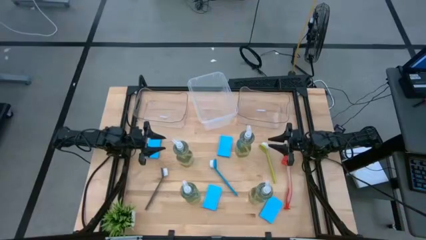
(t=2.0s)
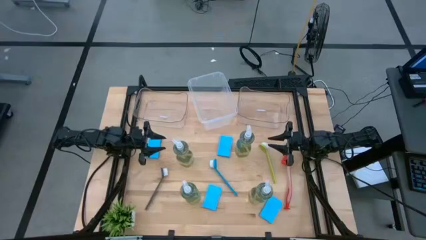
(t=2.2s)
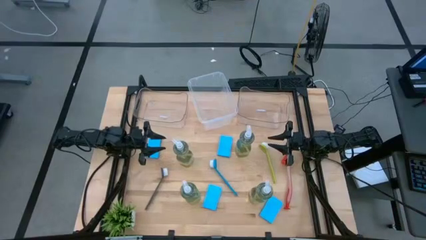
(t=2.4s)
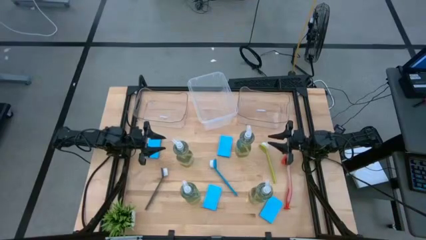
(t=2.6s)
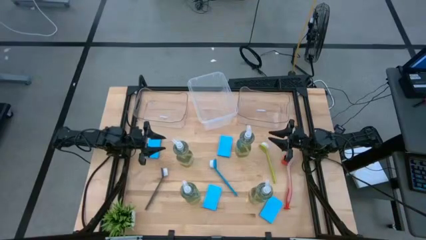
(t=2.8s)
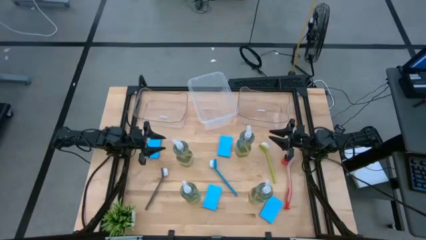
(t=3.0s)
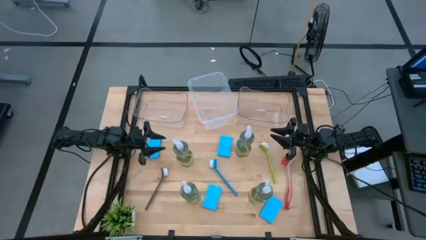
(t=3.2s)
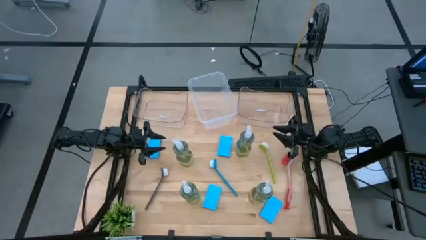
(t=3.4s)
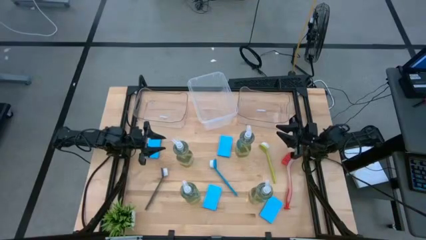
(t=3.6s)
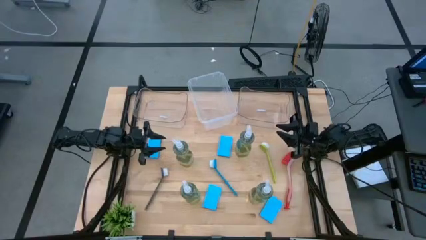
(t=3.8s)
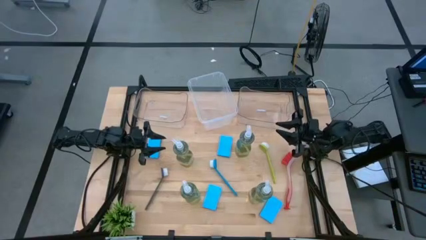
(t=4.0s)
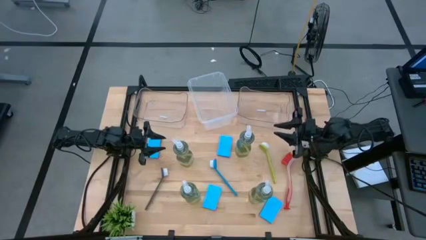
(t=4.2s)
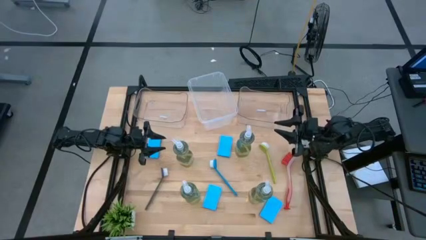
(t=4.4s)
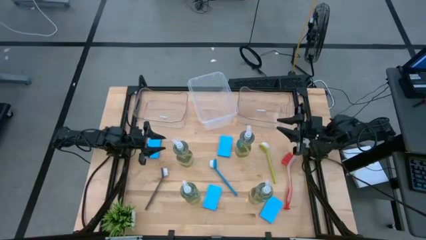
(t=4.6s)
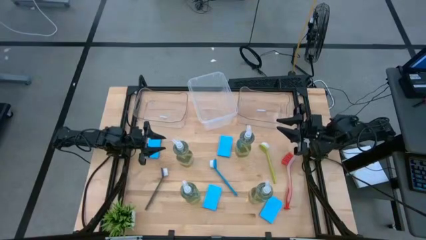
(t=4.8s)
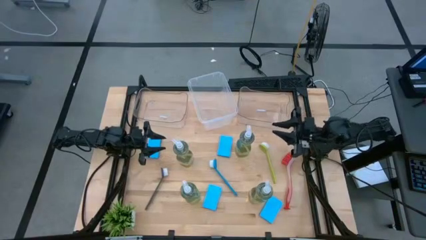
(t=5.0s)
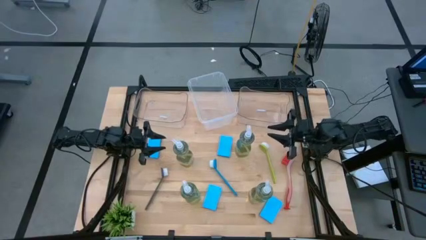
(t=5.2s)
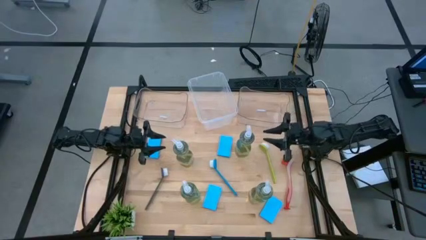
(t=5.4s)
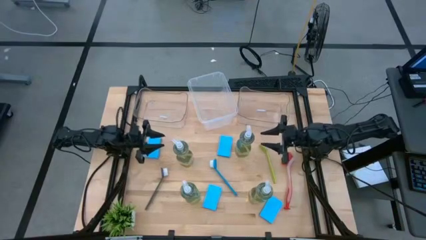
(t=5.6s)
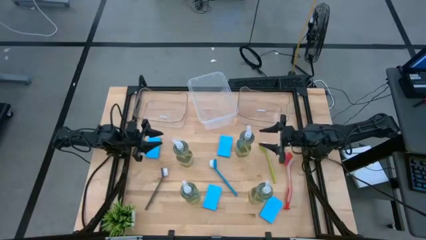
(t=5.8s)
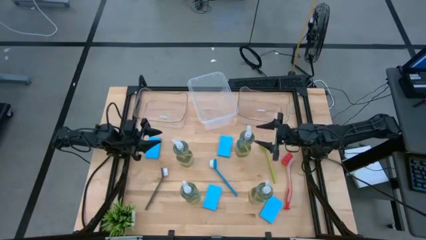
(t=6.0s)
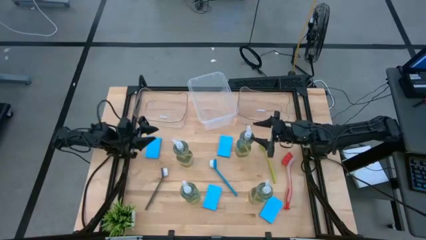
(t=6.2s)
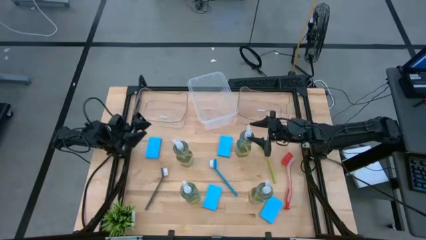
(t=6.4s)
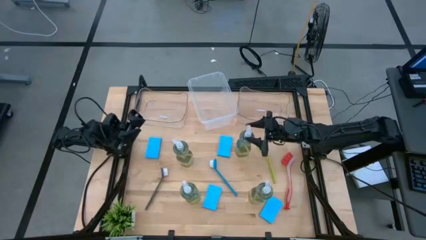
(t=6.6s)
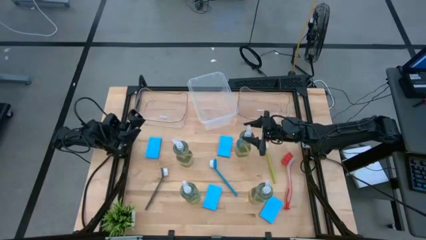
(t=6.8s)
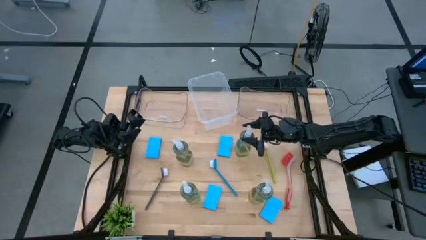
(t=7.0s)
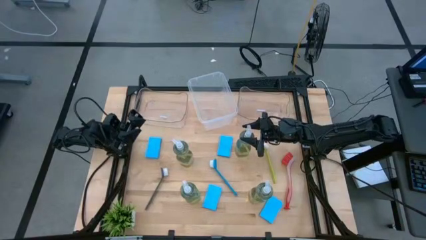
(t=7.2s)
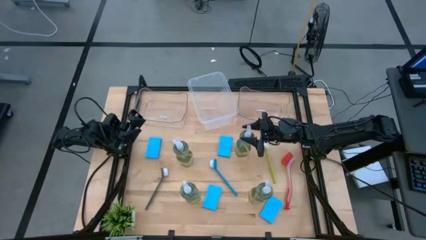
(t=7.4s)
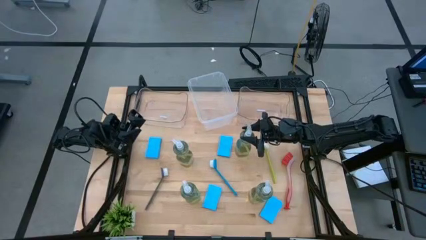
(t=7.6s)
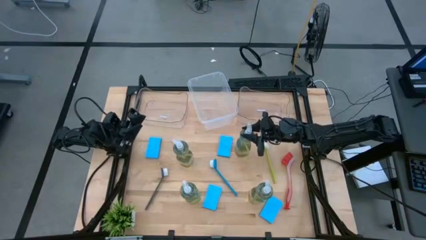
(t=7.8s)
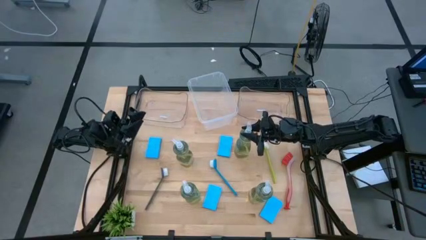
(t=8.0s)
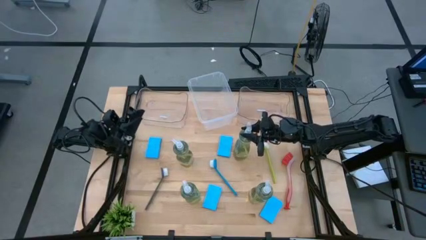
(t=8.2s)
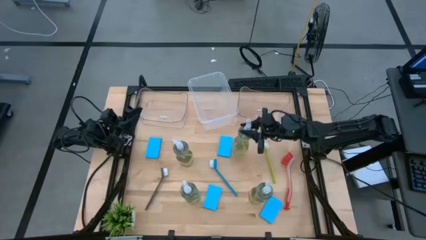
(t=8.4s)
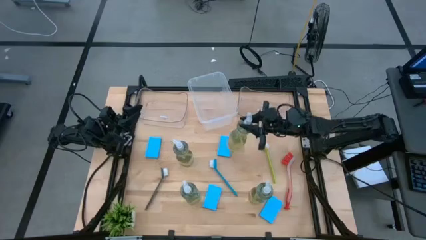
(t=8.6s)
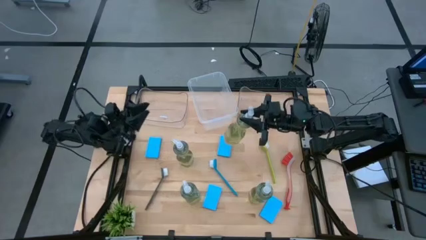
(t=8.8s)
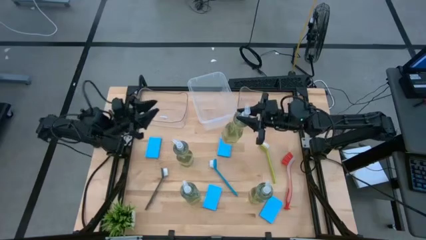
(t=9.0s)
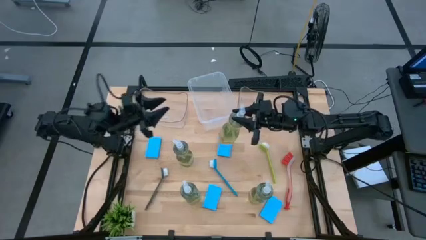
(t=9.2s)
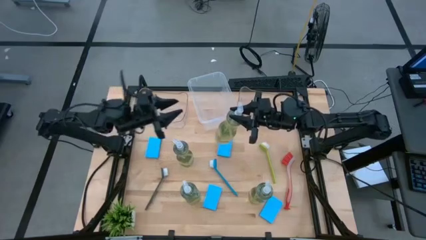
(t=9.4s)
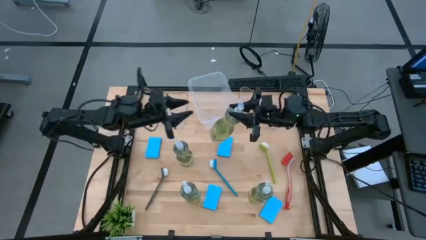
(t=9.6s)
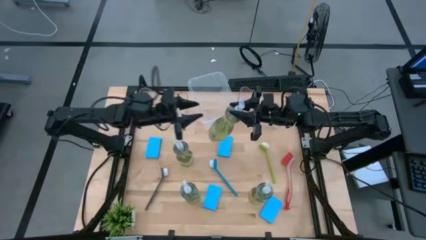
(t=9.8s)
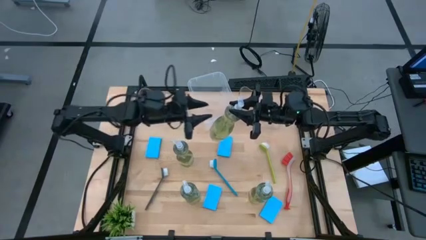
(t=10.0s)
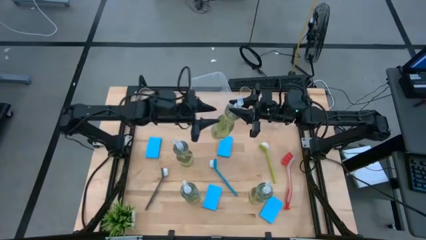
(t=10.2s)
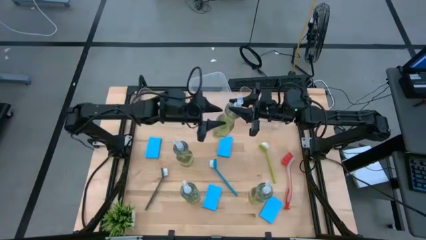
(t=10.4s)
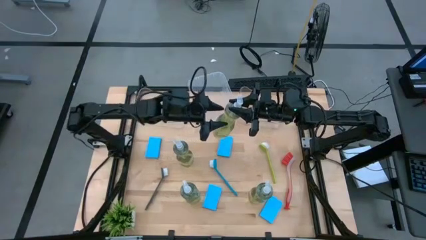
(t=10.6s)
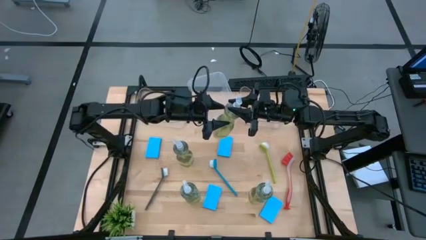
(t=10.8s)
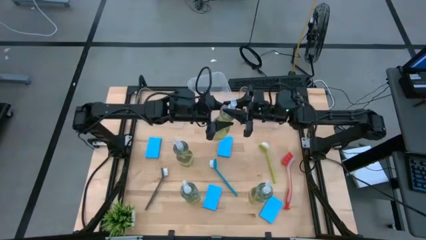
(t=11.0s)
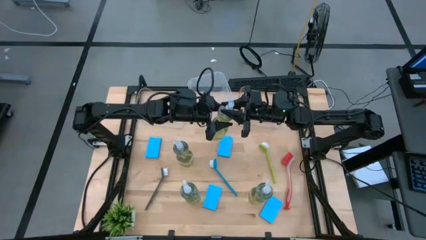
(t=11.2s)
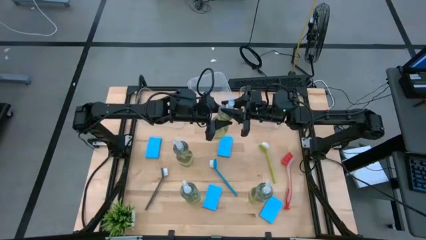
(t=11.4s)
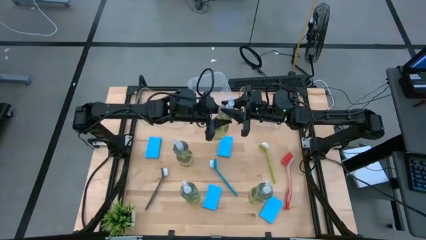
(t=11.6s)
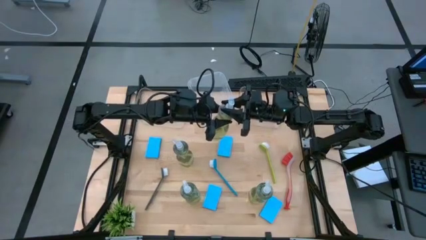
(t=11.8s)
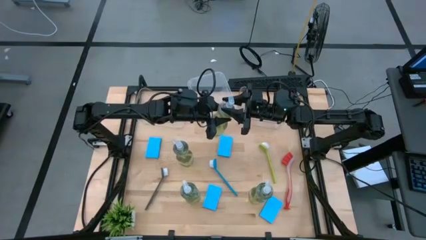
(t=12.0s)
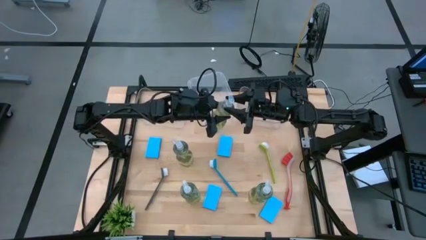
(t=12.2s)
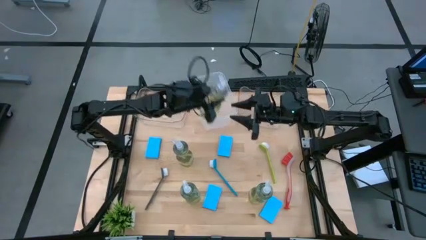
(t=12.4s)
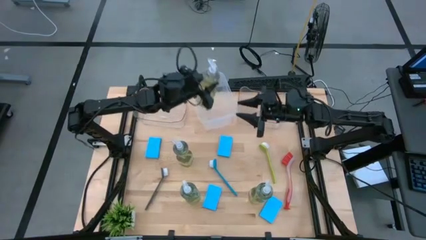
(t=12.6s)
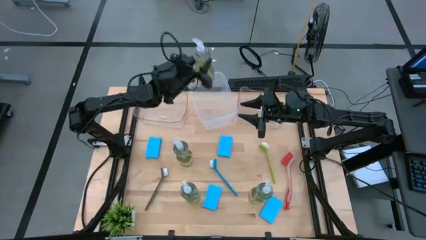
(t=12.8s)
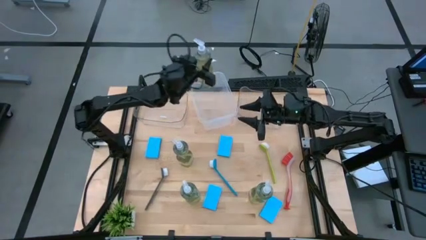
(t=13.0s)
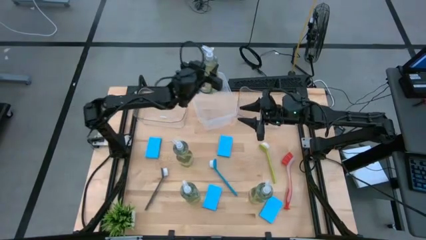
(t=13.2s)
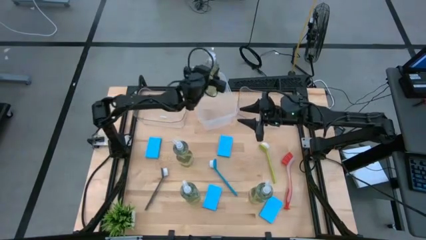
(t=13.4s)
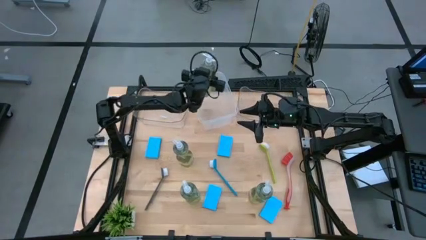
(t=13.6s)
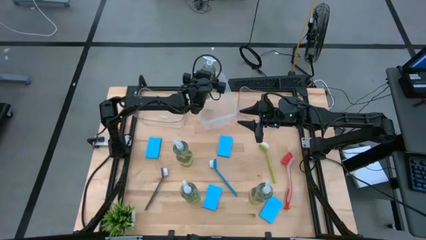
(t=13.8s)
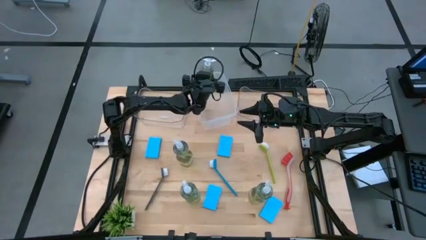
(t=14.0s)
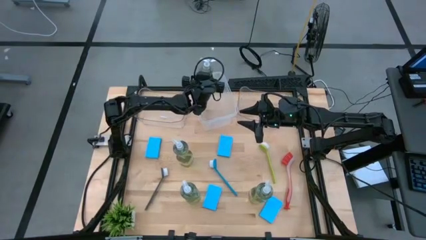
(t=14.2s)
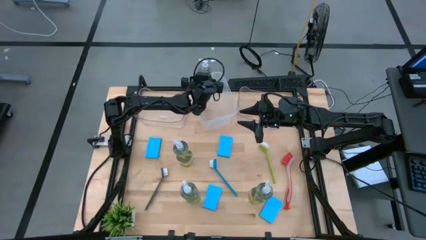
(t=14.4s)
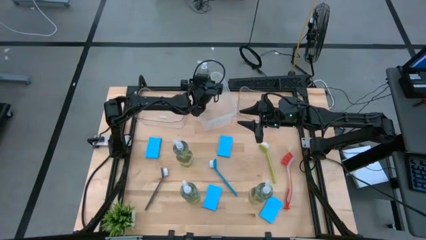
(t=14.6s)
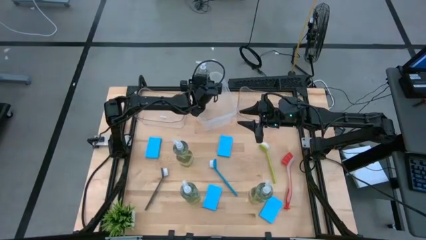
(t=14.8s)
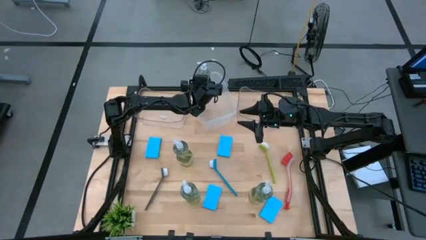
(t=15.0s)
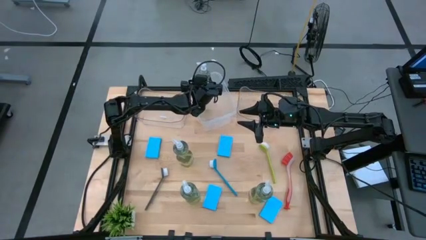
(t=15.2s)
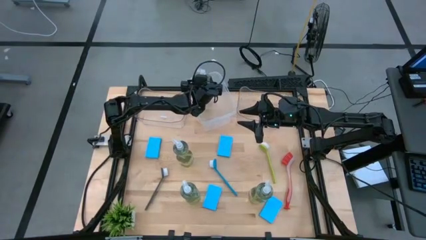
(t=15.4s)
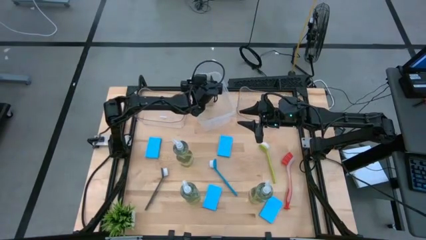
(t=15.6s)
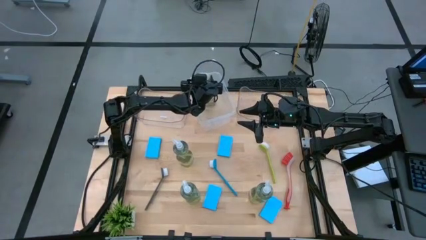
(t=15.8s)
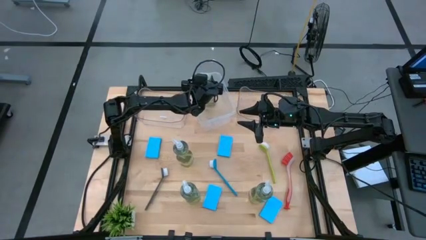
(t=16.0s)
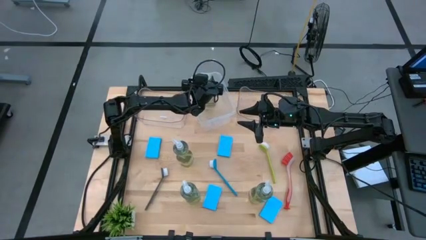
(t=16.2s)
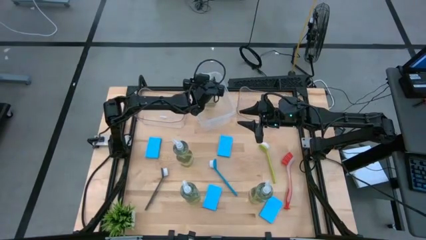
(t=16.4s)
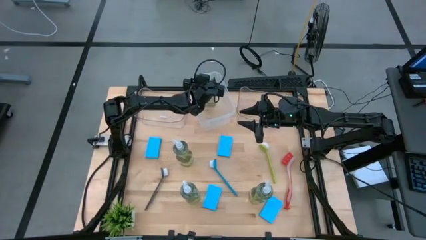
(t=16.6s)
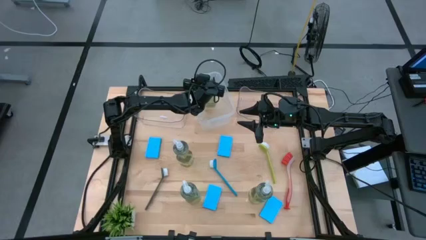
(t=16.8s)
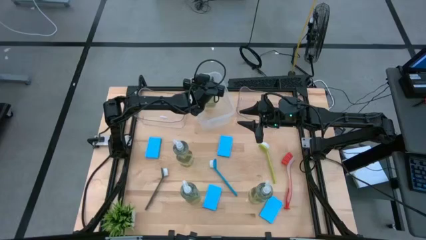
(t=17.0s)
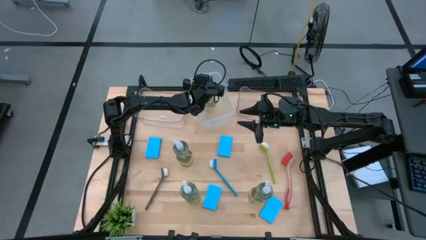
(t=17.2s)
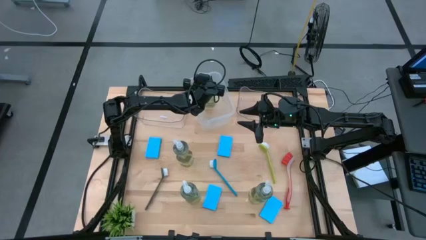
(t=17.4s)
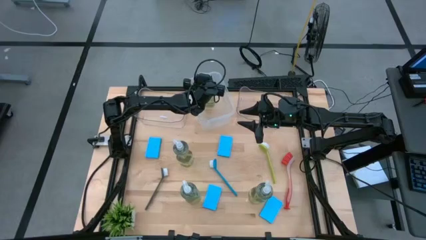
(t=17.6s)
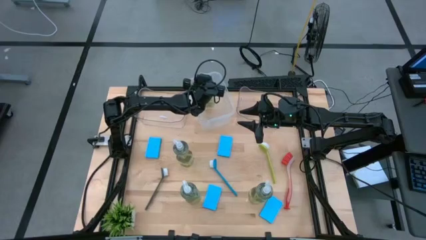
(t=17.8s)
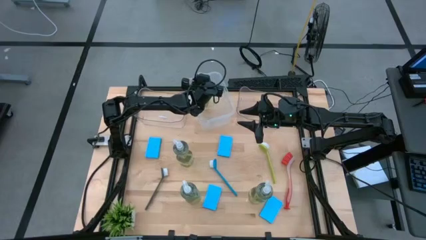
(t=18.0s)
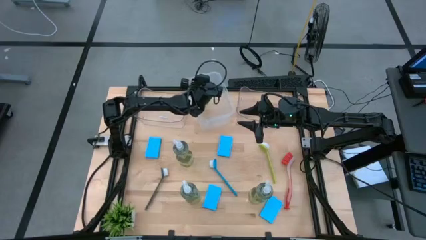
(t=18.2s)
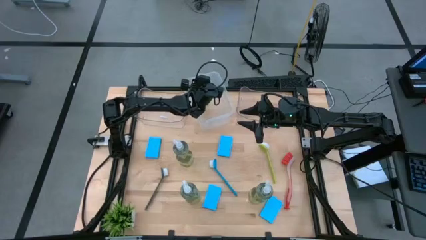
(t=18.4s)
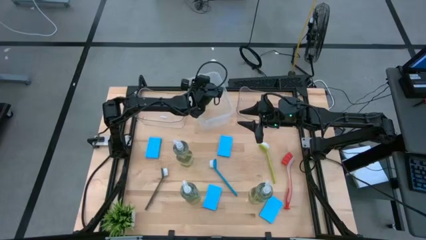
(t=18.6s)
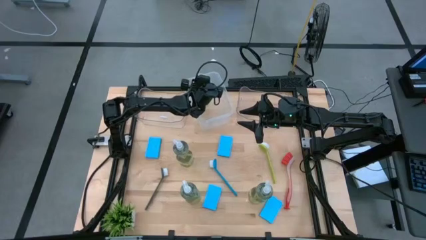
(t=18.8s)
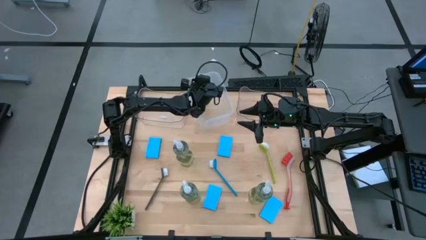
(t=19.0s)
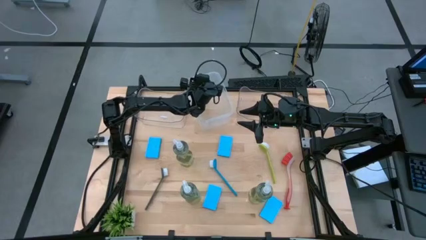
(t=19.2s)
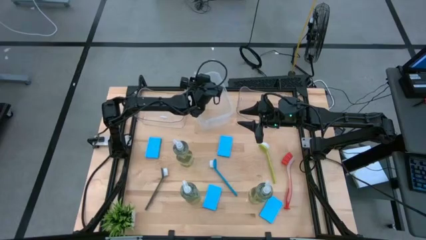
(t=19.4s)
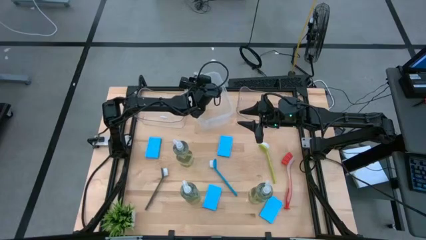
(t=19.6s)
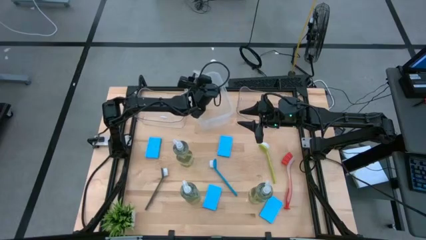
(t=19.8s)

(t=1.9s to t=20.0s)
Task: Pick & Place Kitchen Sink Supplies
Put the dish soap into the white bin
